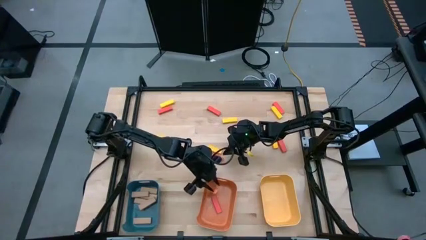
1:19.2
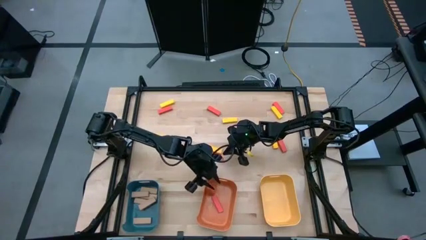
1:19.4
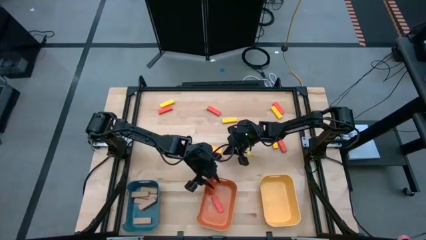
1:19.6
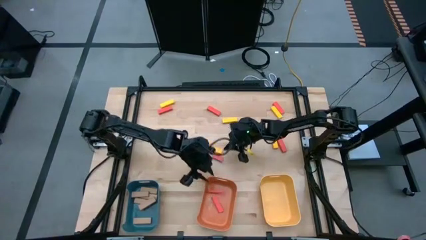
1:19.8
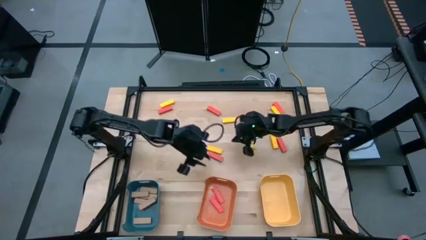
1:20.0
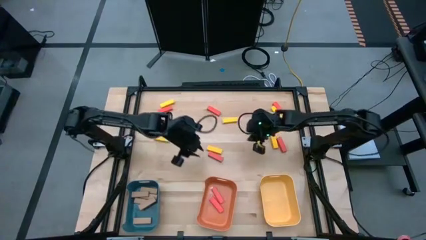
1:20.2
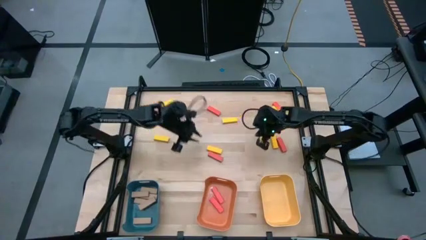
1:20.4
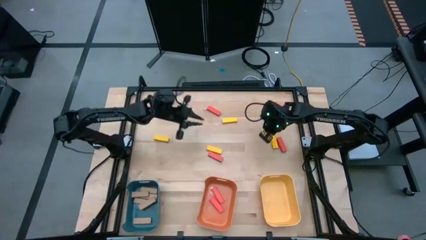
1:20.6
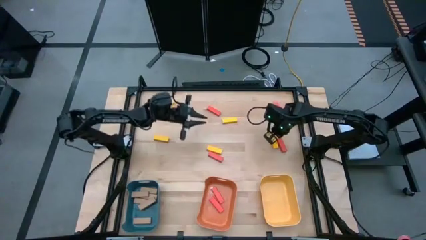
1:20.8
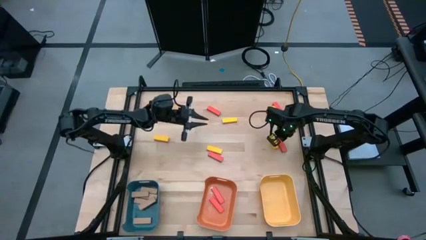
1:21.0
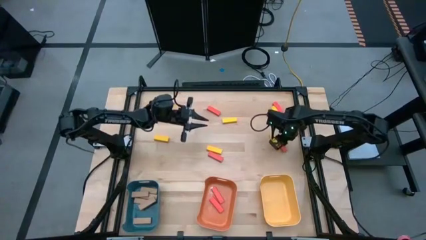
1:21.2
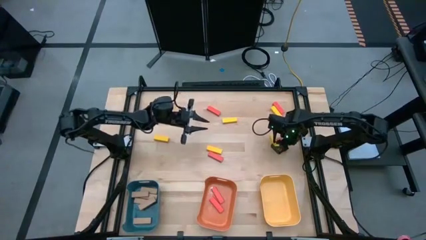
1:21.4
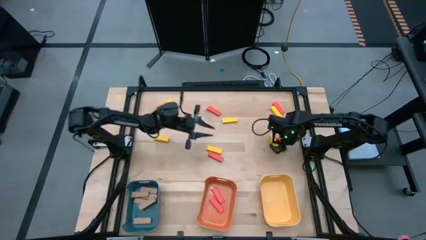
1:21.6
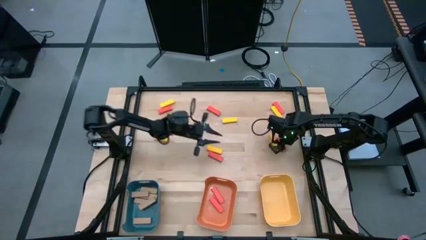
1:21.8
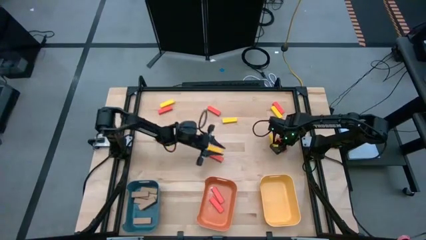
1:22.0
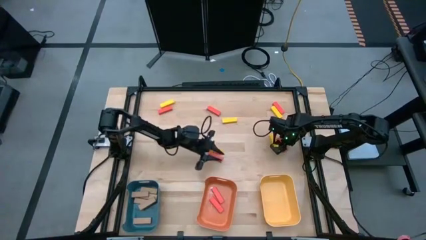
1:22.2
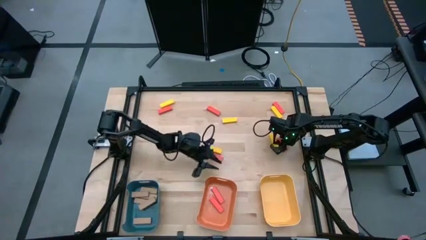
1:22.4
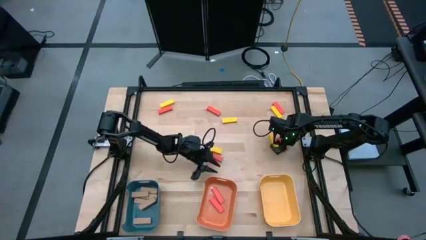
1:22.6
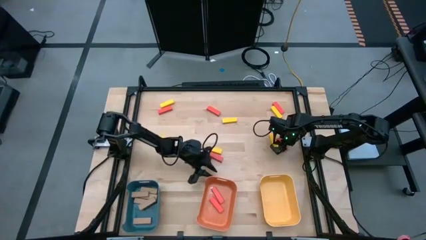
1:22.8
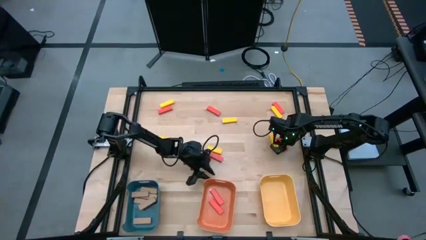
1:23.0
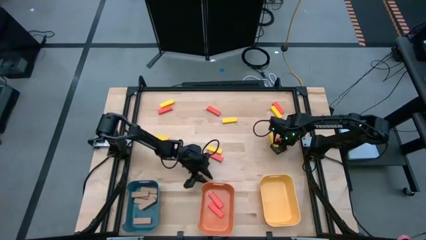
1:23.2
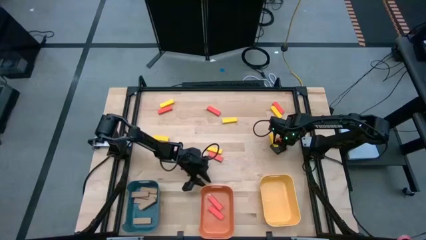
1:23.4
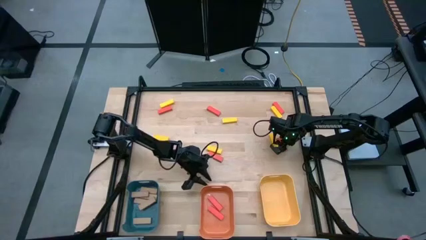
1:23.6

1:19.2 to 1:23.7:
Task: Sort blocks
Adjust the orange bin

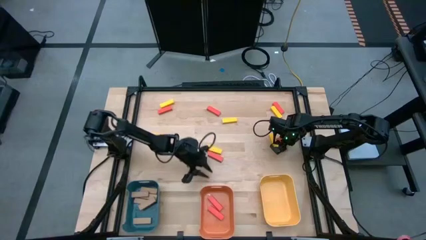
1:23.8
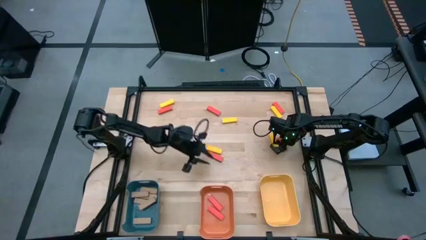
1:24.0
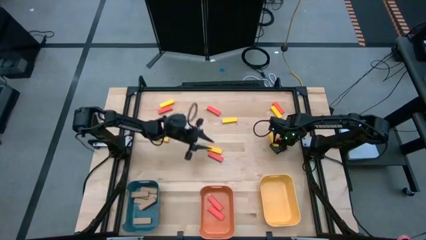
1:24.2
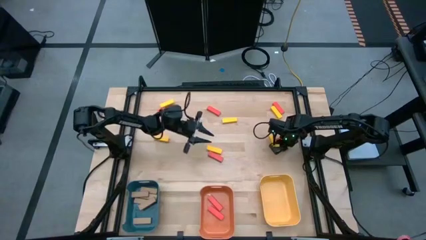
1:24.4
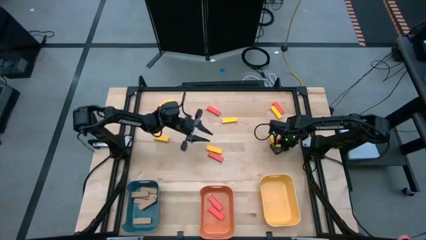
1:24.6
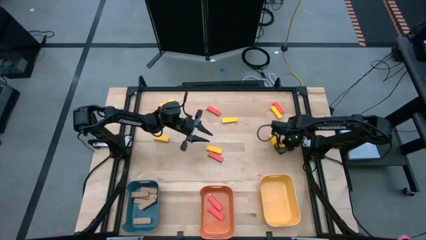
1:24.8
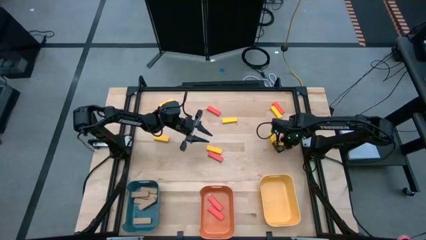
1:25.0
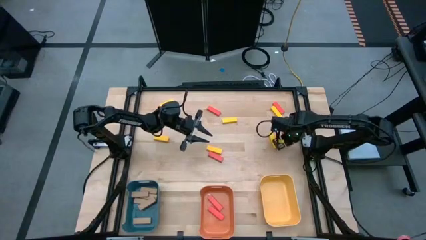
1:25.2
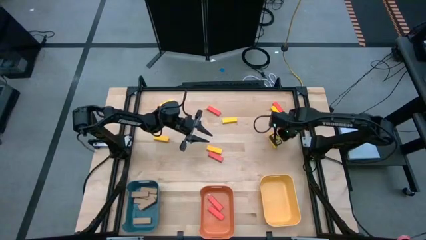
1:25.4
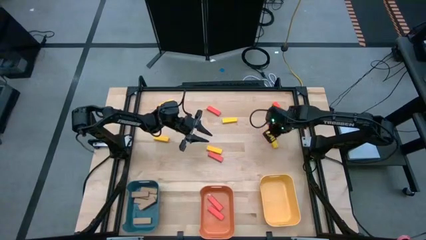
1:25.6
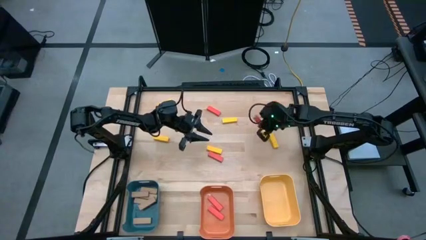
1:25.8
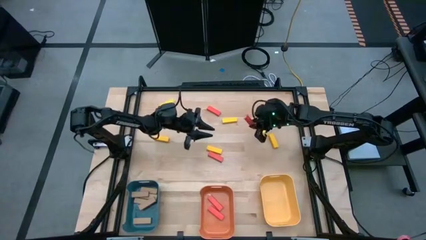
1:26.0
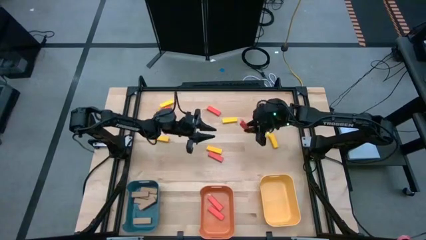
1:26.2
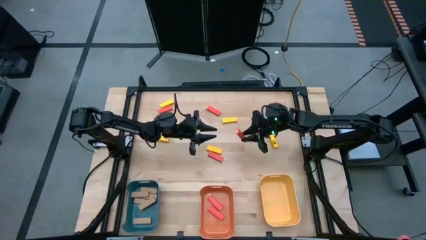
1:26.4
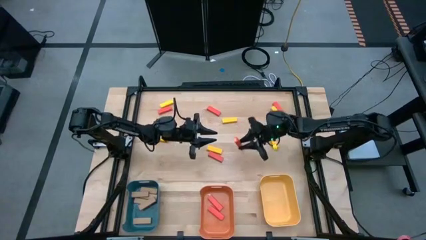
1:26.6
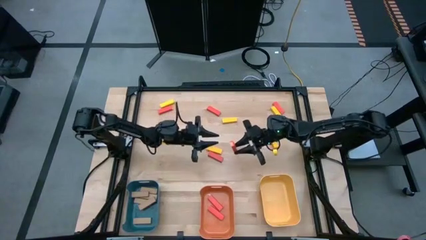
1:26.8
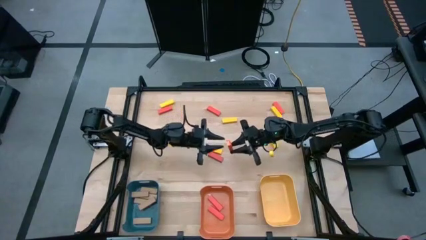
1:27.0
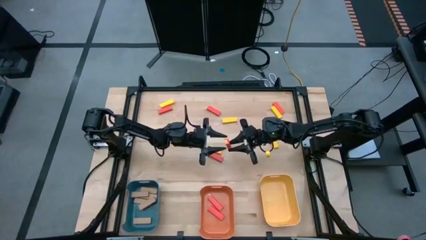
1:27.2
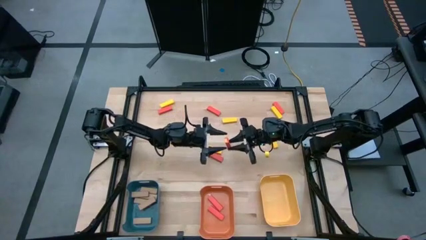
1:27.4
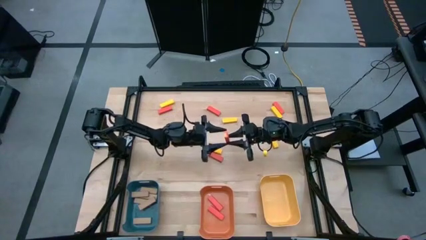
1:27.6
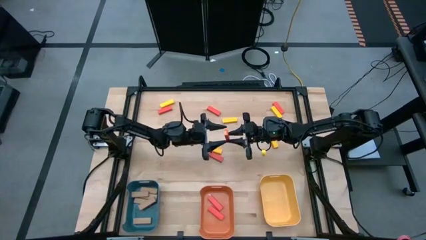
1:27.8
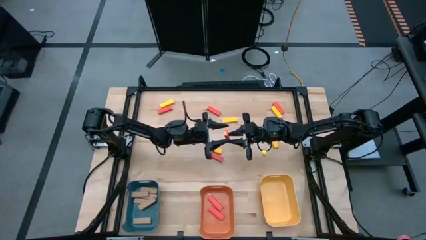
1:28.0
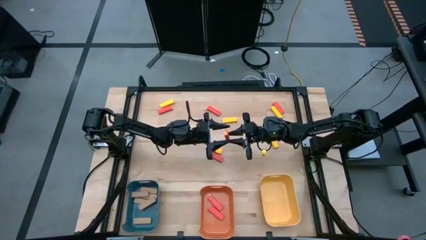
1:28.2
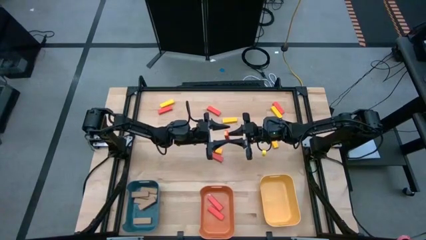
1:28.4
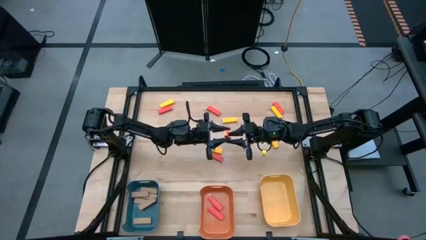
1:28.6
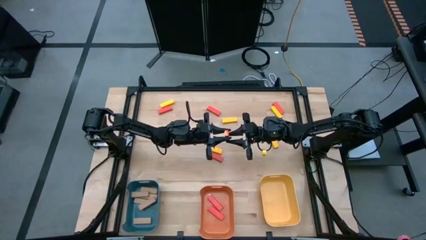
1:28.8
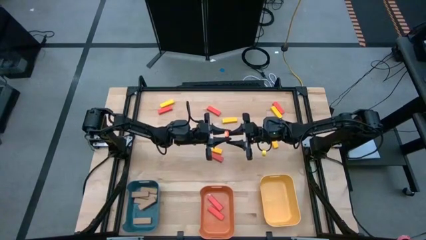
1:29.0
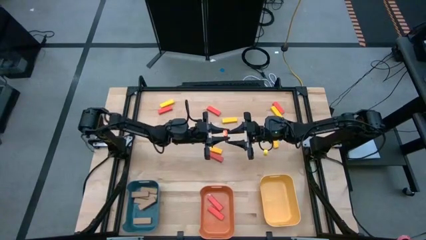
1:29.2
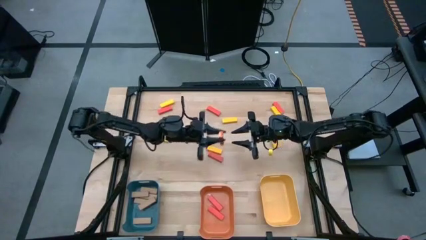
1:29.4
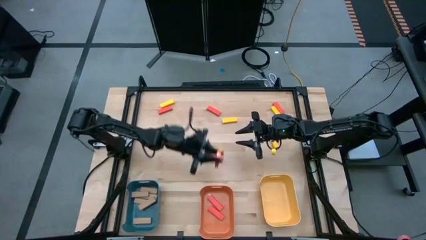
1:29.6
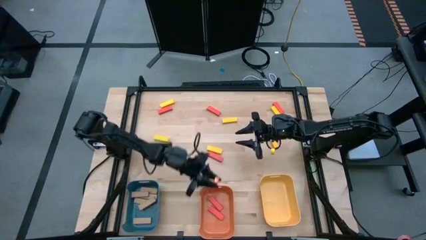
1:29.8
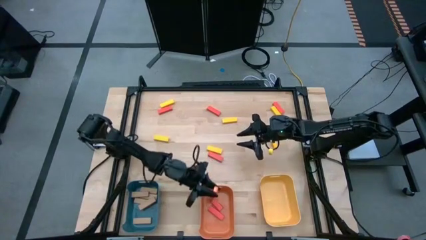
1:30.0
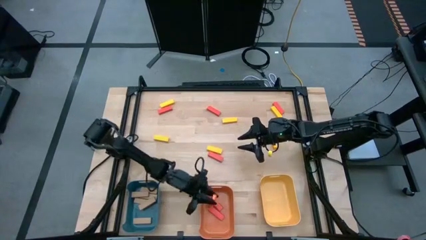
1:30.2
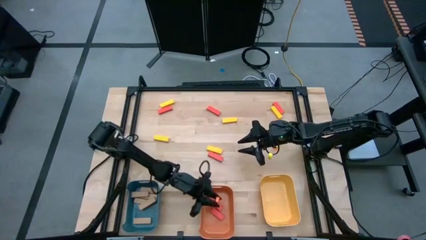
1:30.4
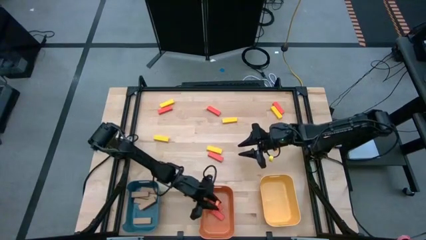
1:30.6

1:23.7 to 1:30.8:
Put the bottom right orange block into the orange bin

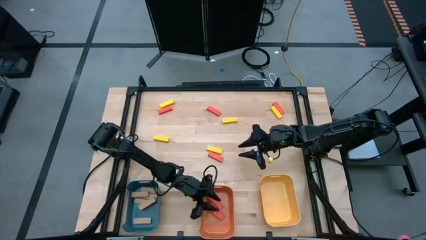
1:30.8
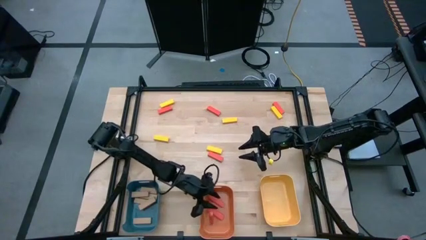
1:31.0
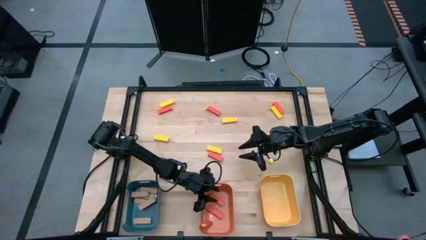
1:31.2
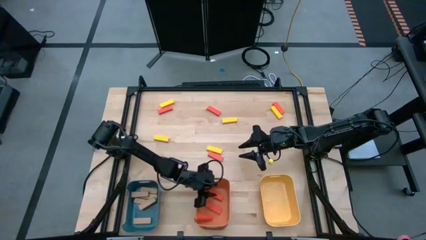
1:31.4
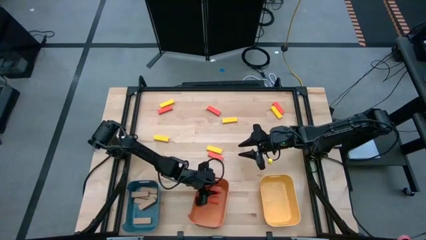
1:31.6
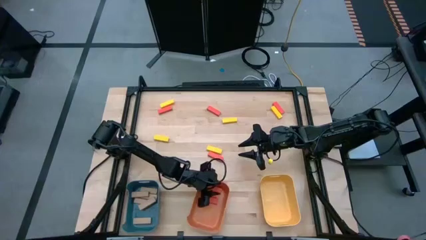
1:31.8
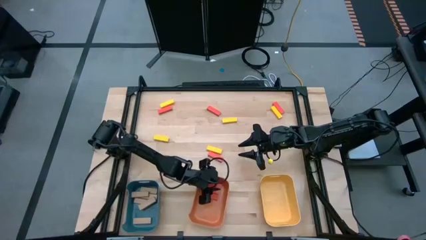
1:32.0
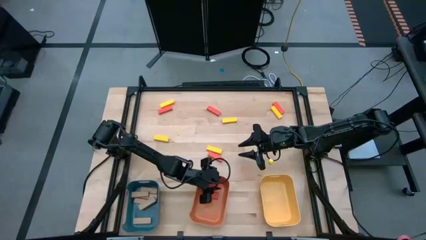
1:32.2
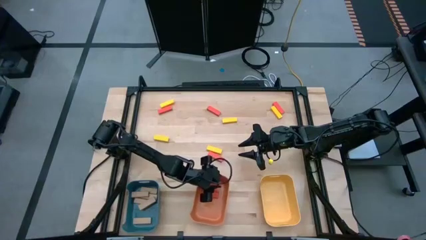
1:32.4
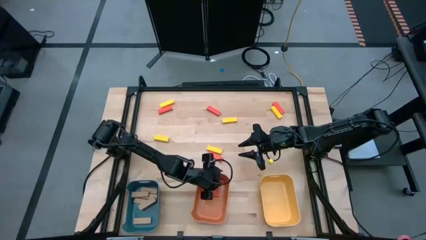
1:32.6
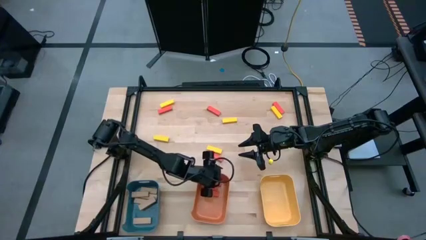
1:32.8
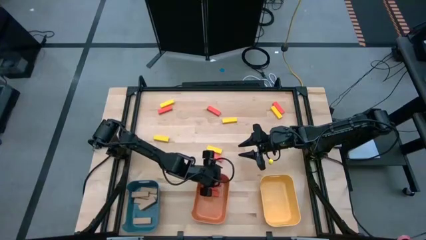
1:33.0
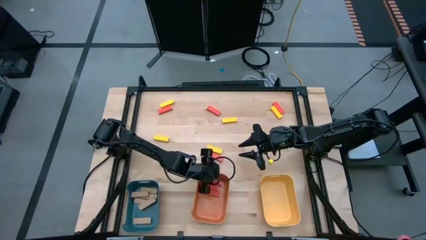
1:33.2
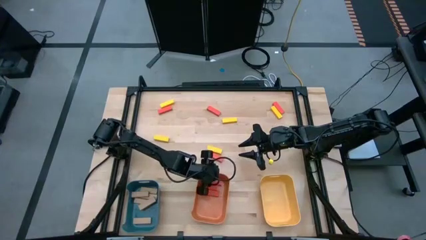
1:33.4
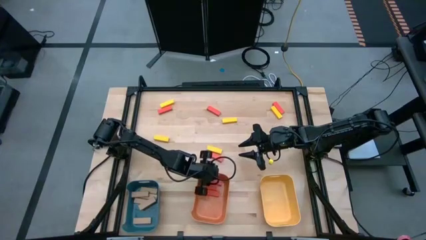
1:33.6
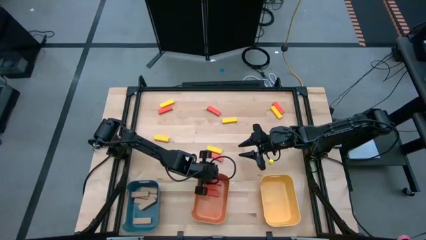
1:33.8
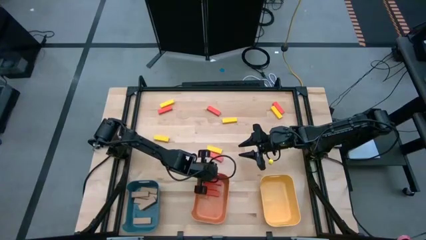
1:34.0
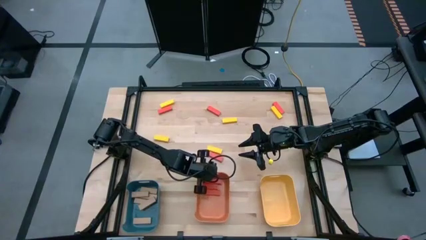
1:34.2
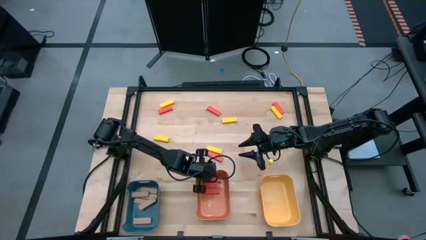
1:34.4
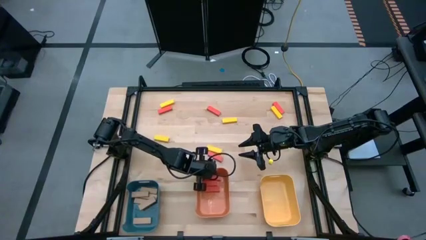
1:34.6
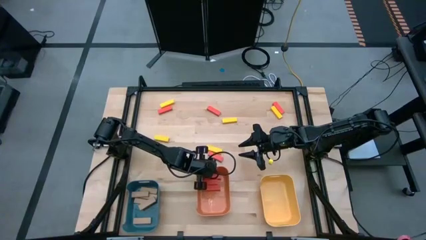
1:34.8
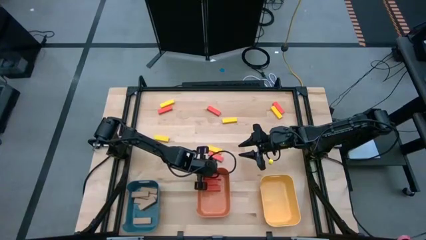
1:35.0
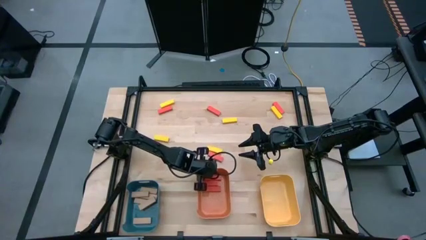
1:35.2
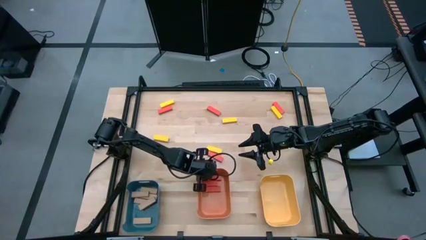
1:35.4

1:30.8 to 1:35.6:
Adjust the orange bin
